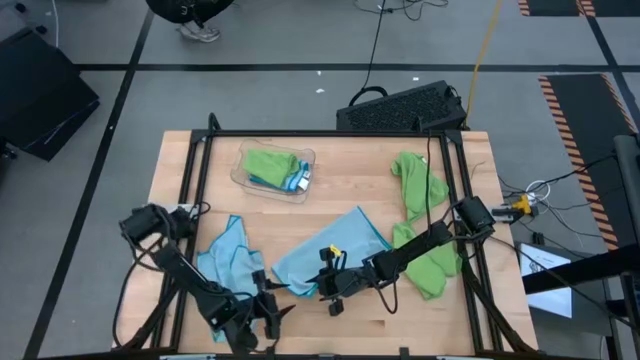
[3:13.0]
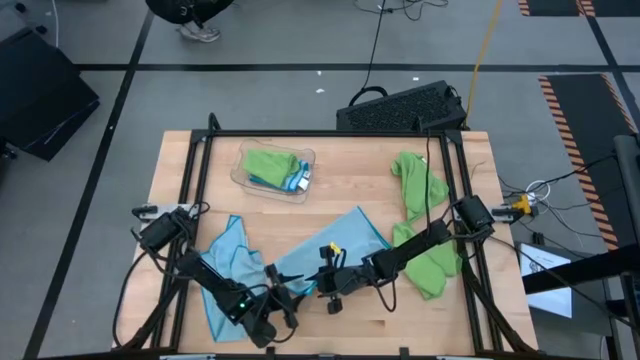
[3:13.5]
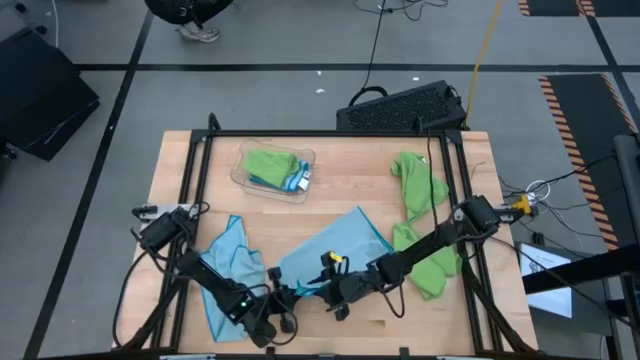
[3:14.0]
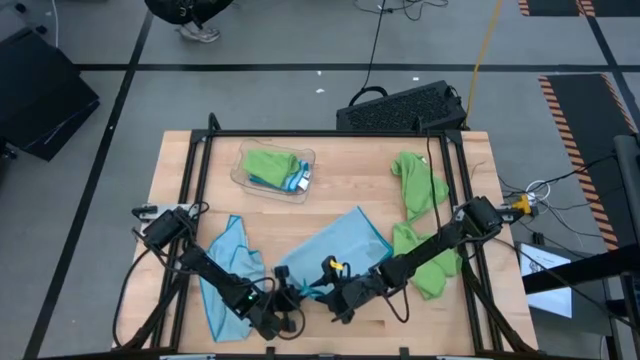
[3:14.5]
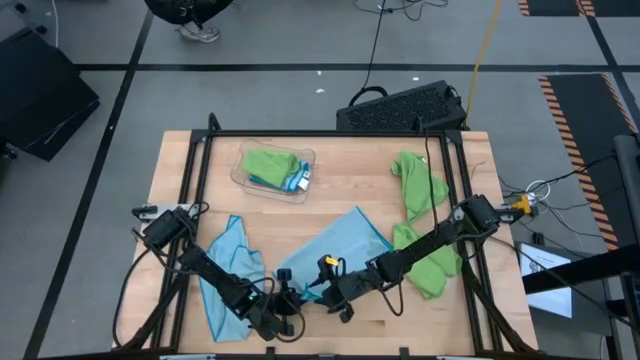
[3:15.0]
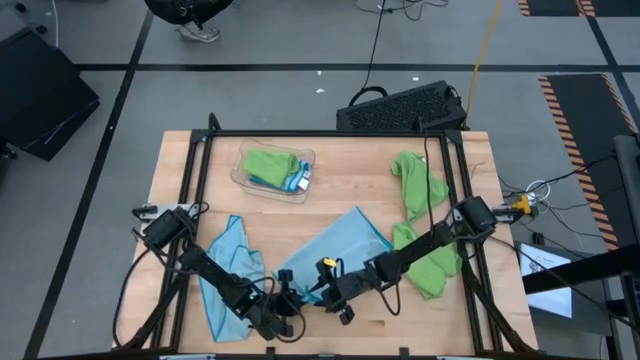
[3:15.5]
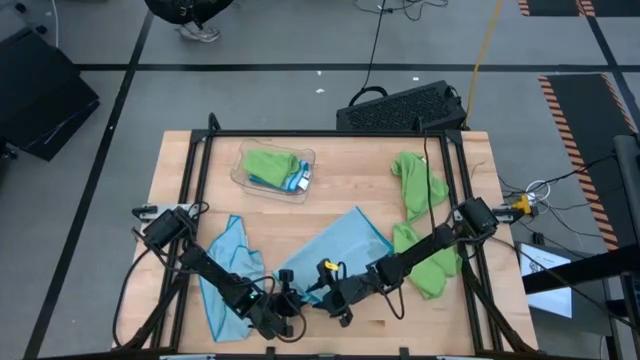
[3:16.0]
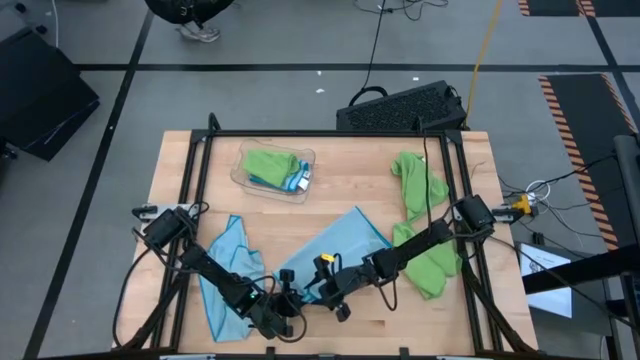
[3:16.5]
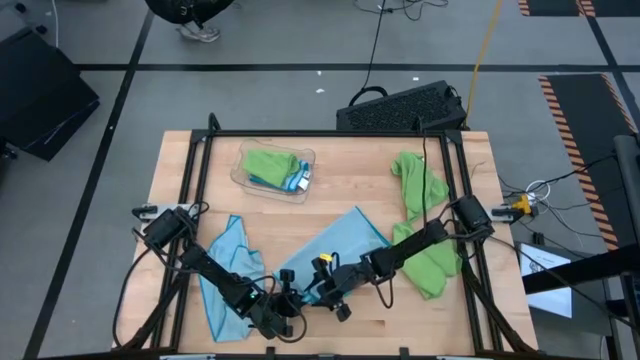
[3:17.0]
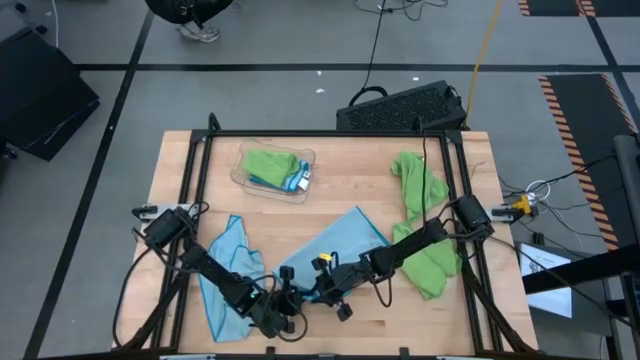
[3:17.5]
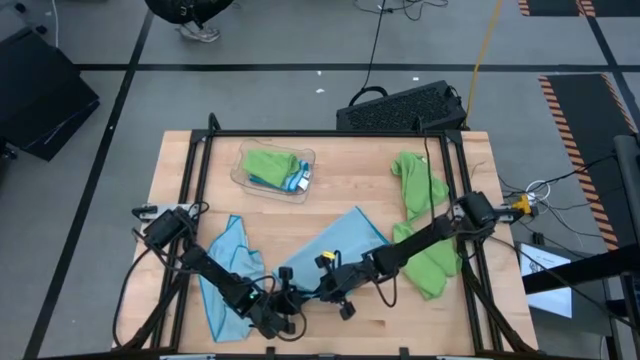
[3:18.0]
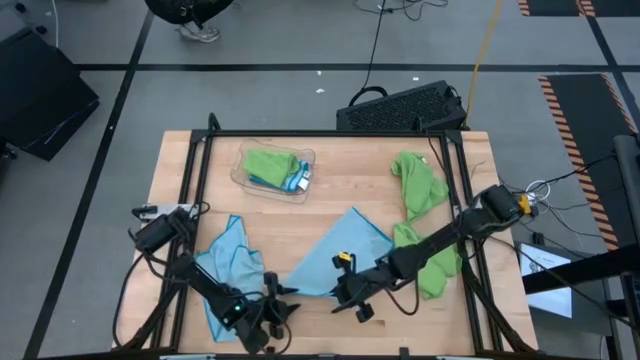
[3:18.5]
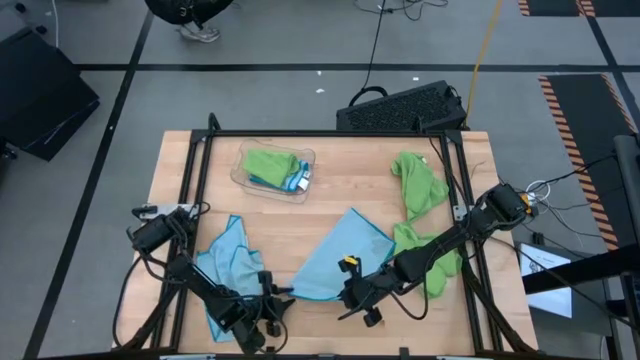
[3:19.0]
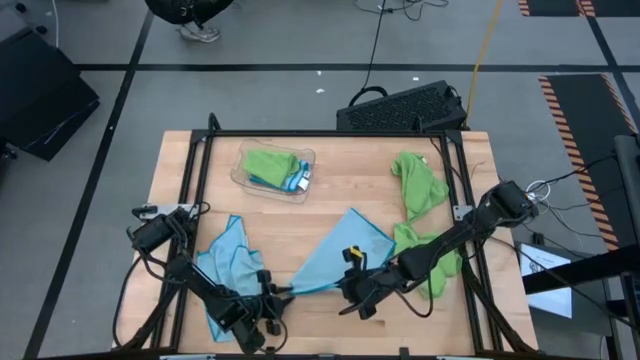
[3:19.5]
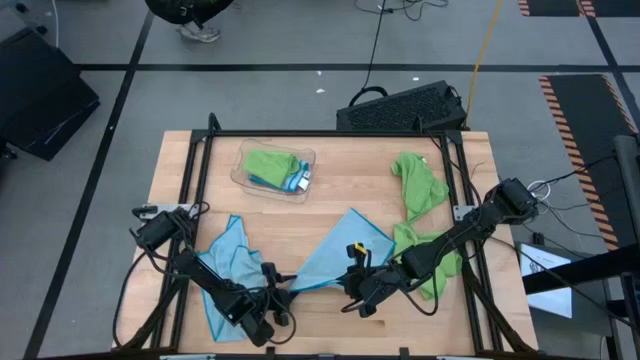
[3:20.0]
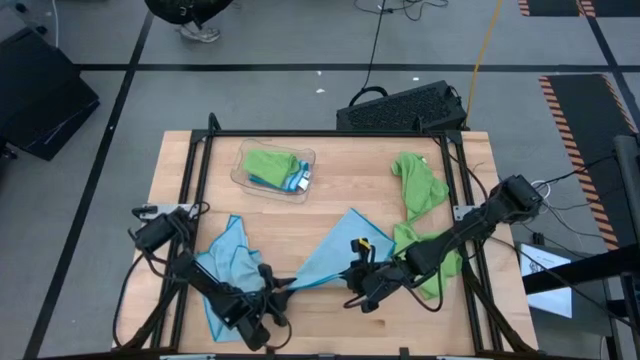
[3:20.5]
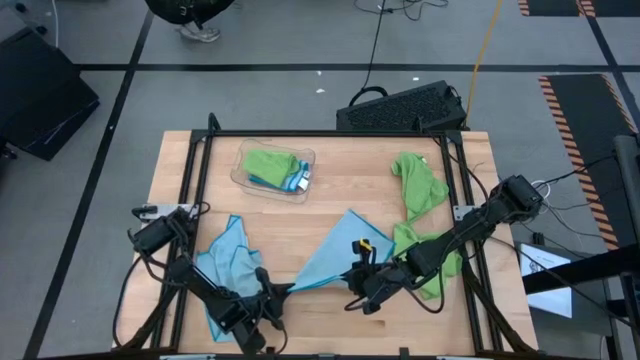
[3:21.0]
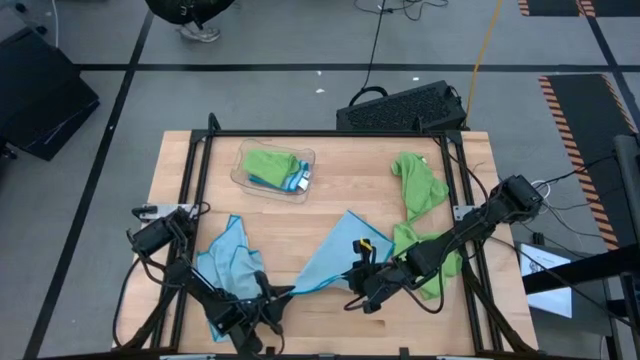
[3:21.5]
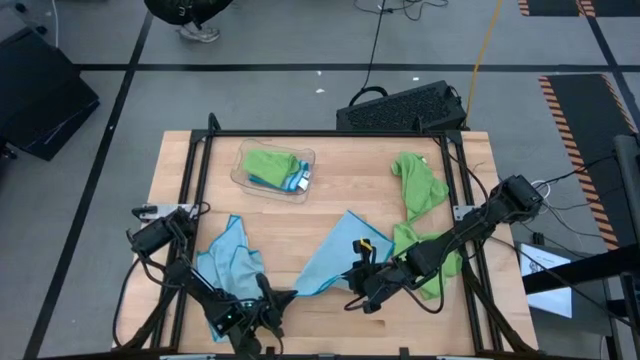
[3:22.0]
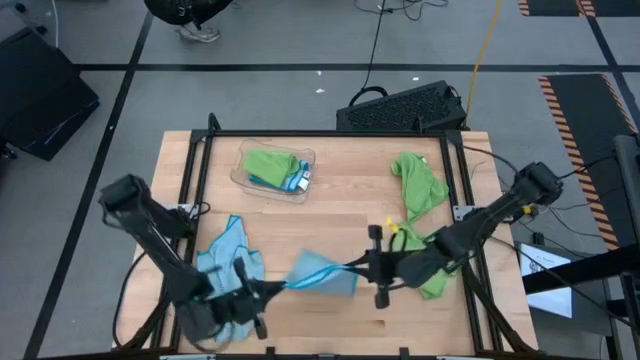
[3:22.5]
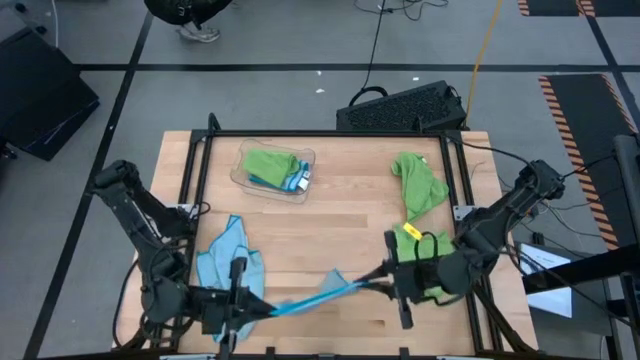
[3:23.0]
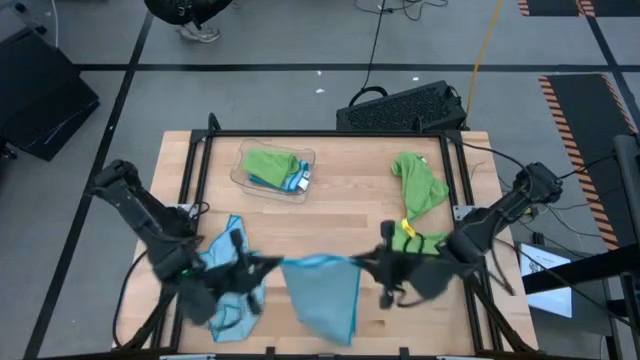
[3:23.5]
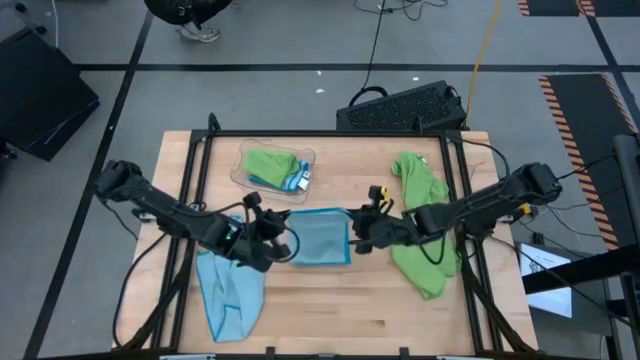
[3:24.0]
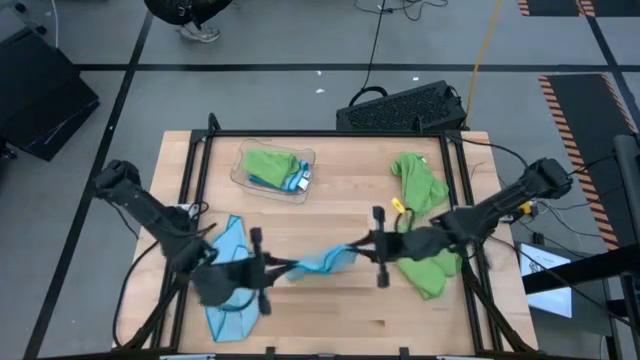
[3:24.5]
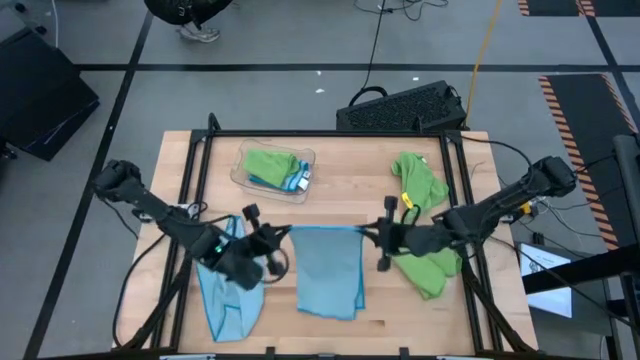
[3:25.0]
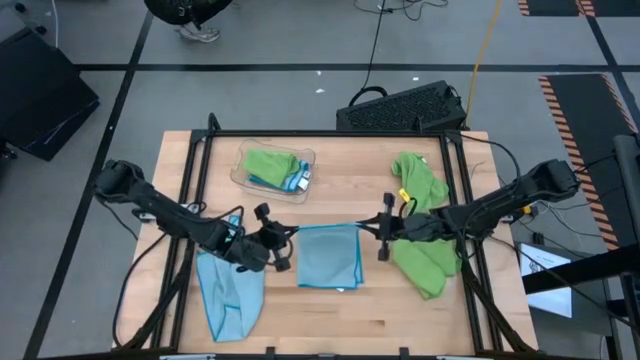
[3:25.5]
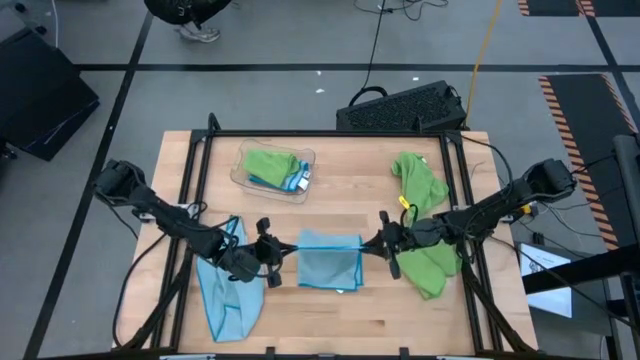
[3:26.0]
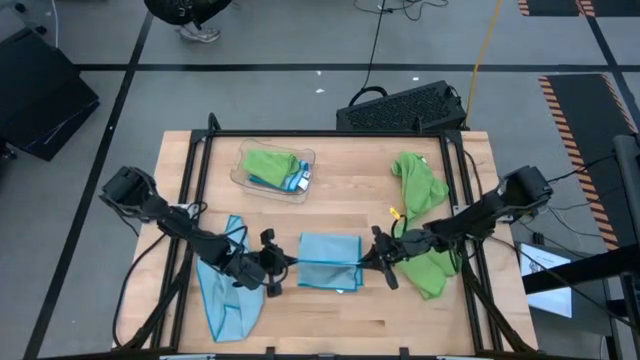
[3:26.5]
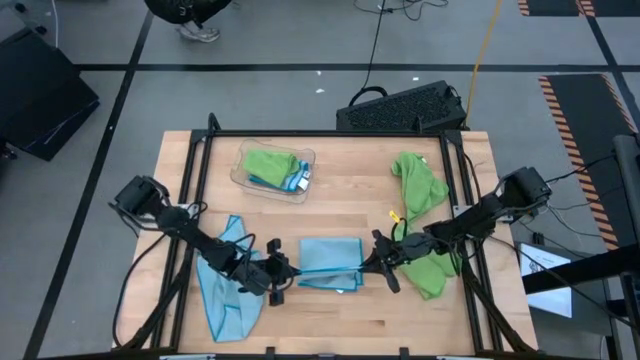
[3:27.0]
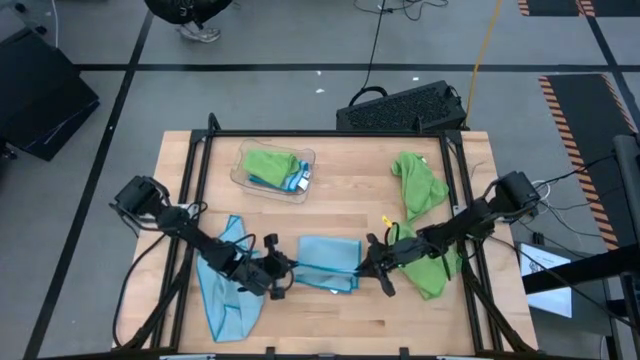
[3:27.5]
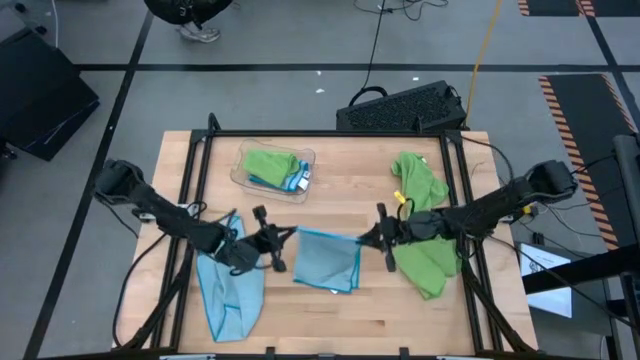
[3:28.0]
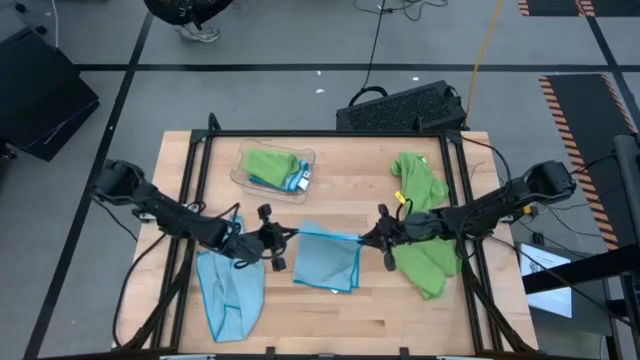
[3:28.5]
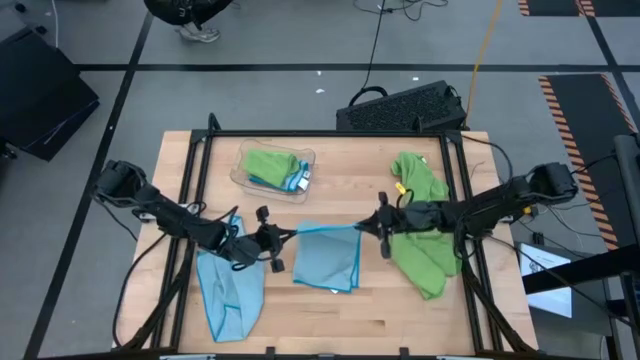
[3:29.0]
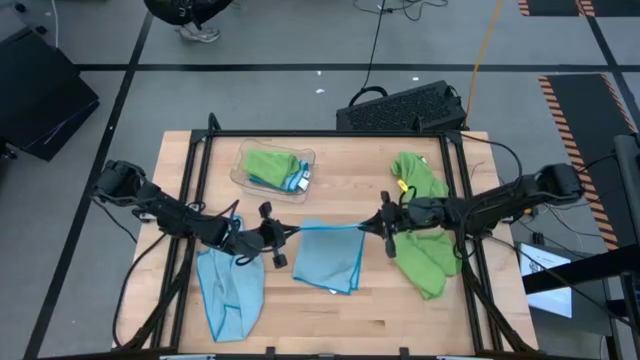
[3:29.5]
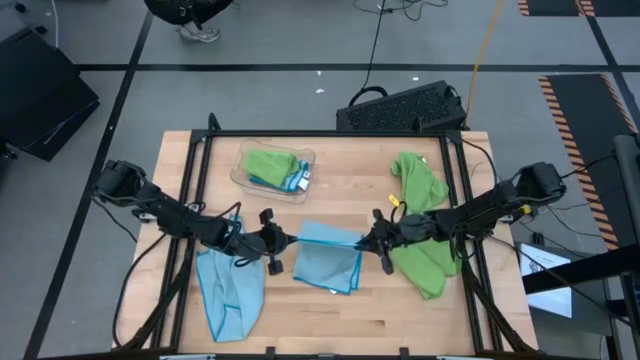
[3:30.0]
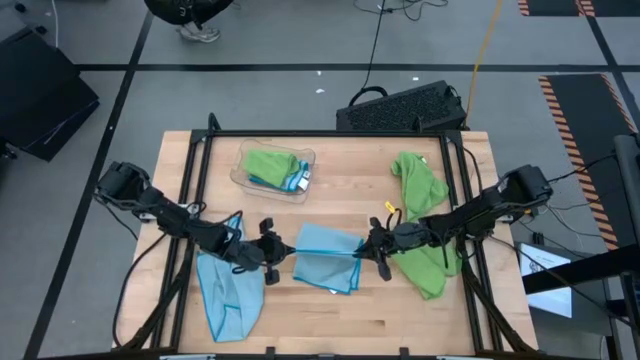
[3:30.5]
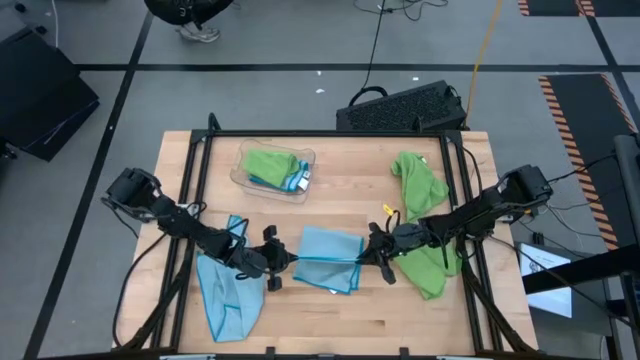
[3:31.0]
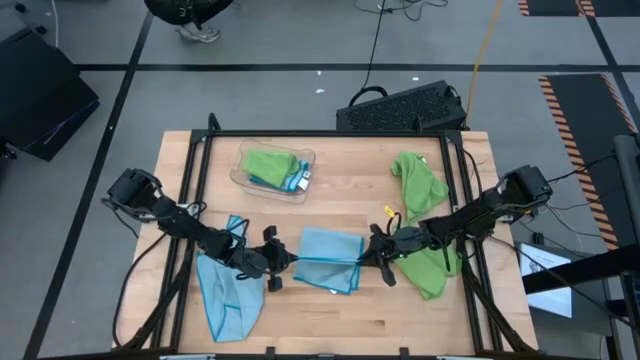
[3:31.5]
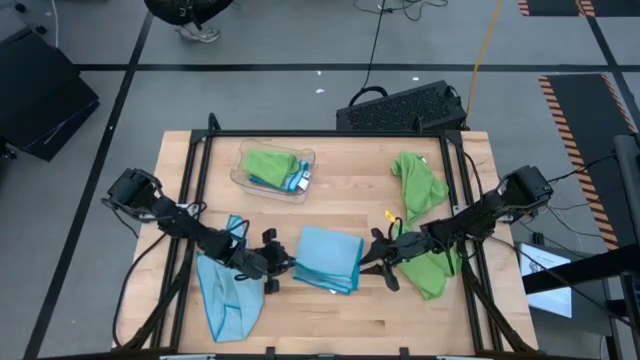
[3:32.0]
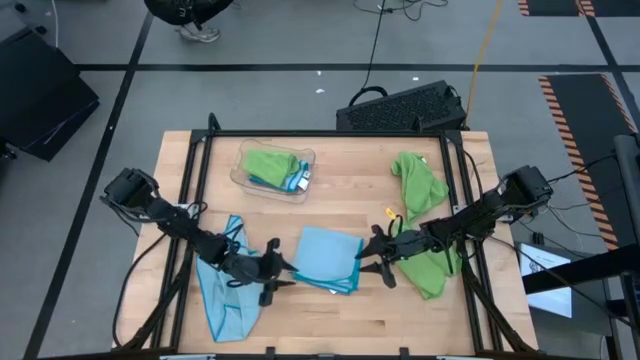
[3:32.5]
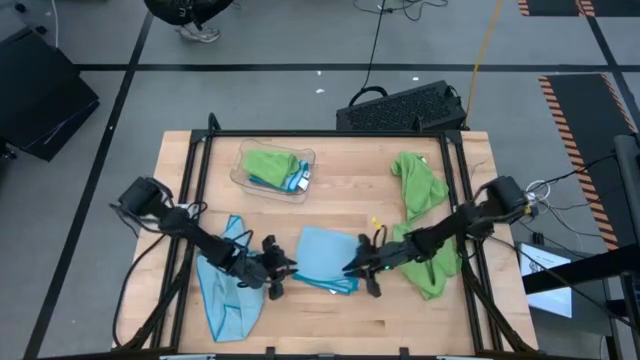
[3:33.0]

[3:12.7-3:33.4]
Task: Fold microfiber towels
Fold the right blue microfiber cloth
